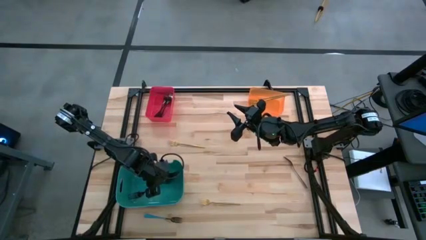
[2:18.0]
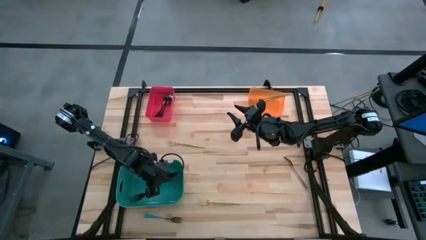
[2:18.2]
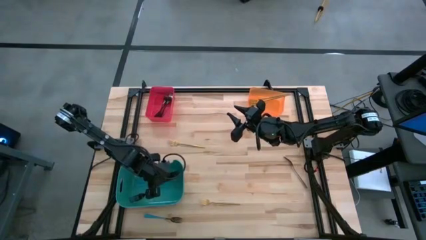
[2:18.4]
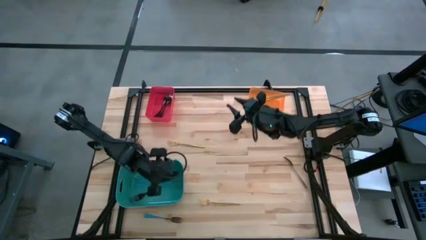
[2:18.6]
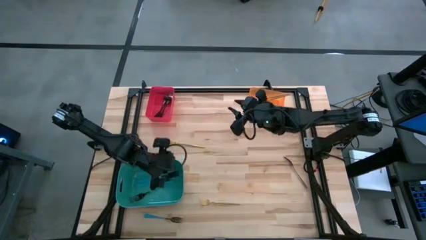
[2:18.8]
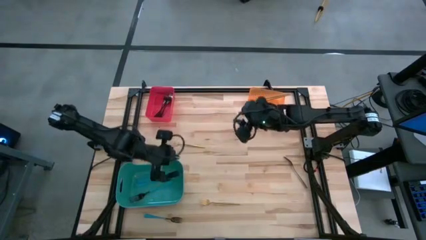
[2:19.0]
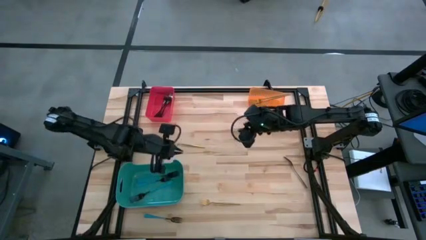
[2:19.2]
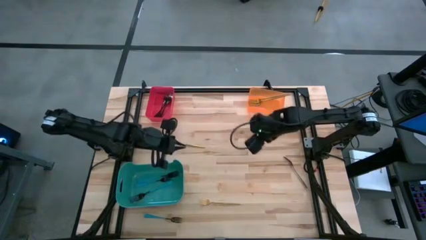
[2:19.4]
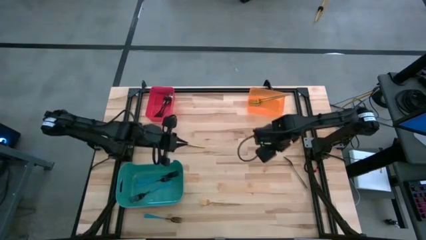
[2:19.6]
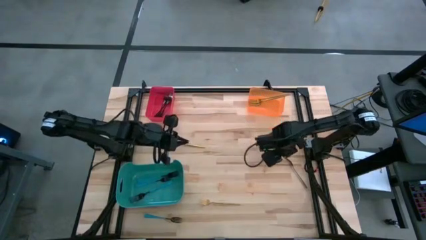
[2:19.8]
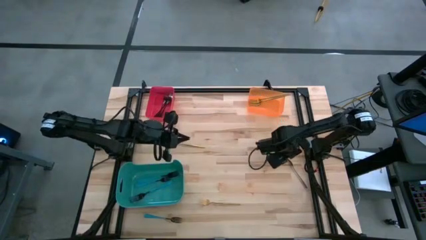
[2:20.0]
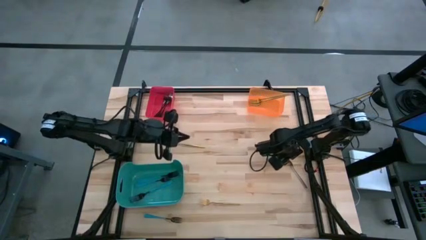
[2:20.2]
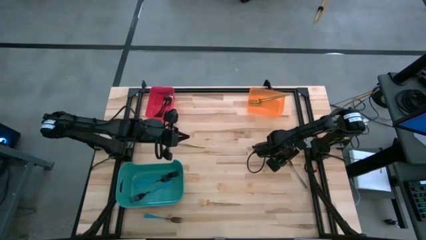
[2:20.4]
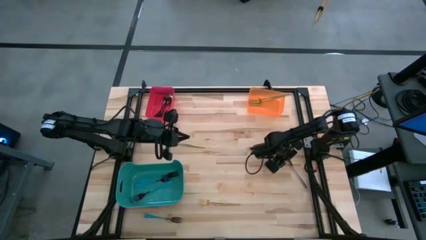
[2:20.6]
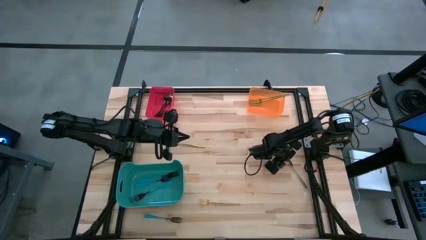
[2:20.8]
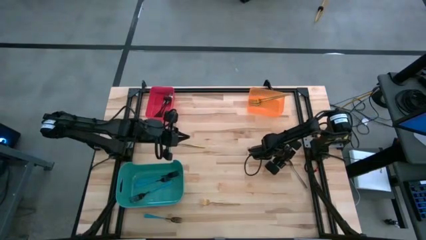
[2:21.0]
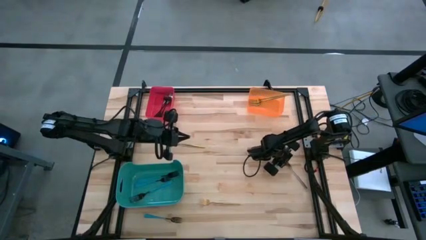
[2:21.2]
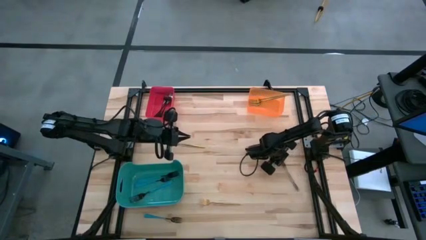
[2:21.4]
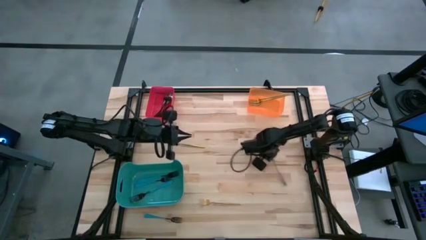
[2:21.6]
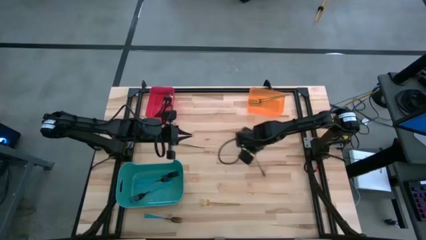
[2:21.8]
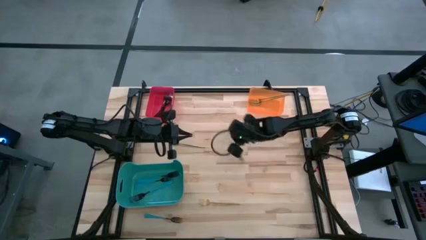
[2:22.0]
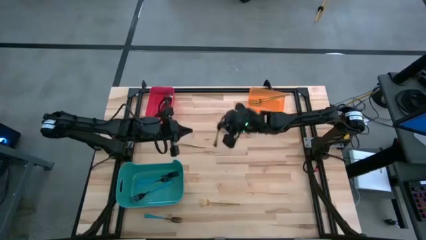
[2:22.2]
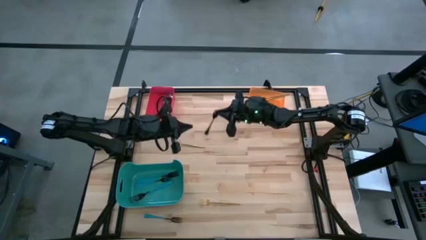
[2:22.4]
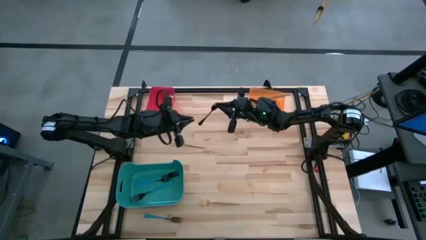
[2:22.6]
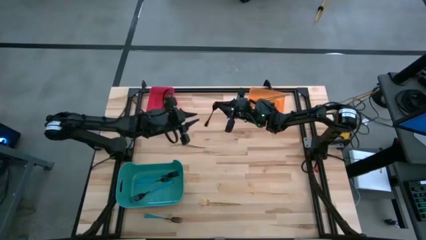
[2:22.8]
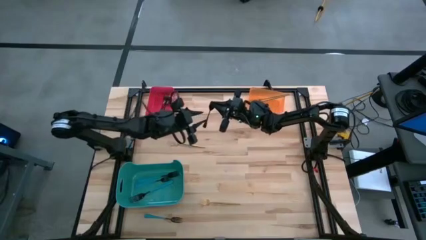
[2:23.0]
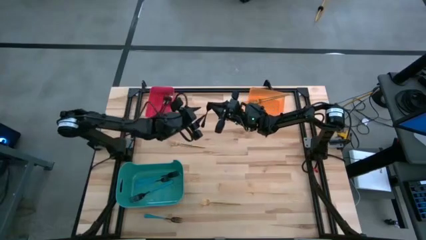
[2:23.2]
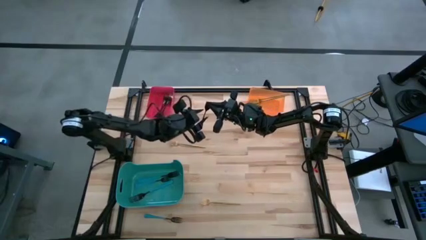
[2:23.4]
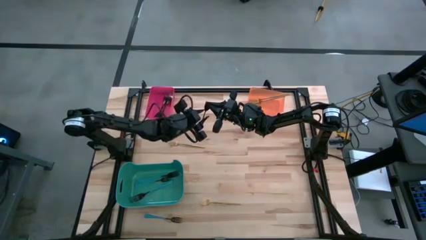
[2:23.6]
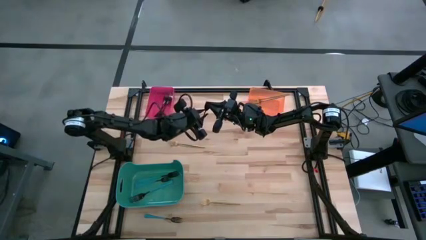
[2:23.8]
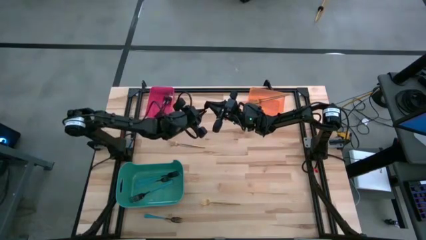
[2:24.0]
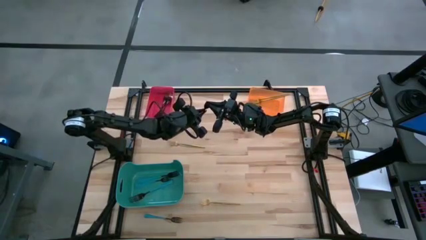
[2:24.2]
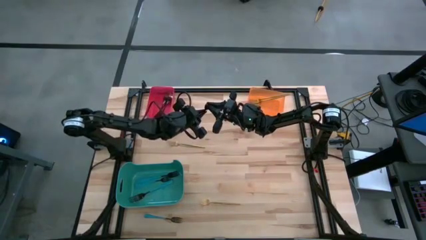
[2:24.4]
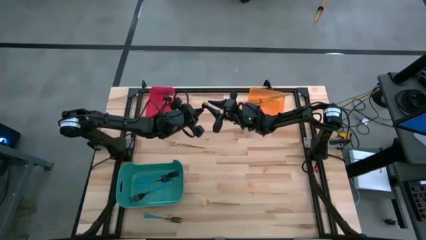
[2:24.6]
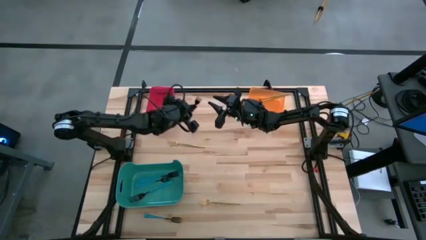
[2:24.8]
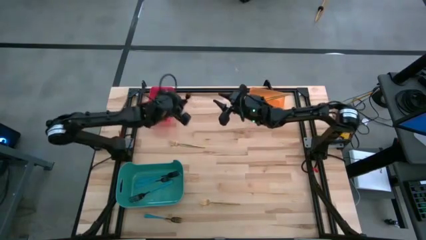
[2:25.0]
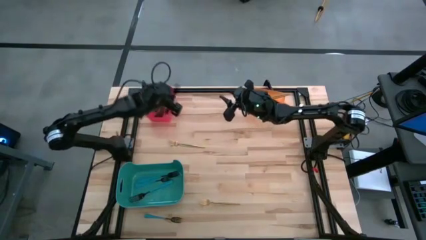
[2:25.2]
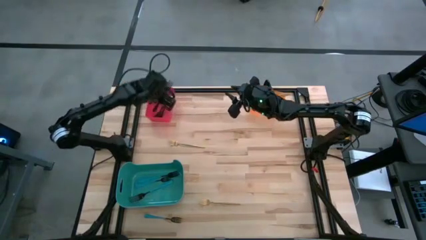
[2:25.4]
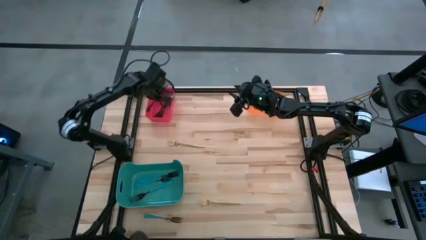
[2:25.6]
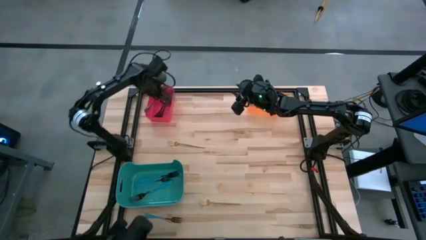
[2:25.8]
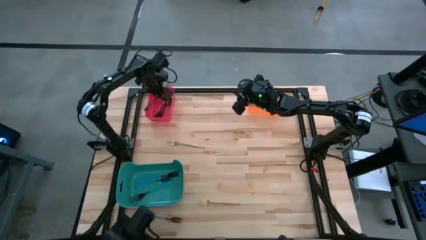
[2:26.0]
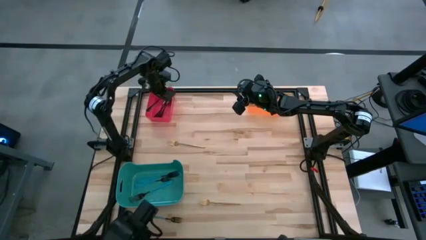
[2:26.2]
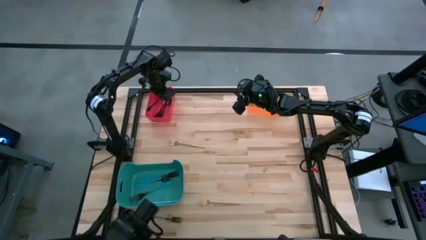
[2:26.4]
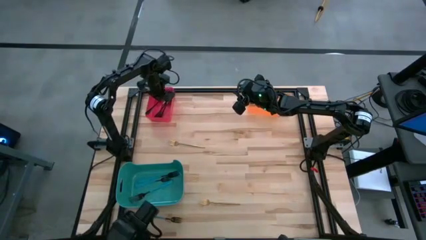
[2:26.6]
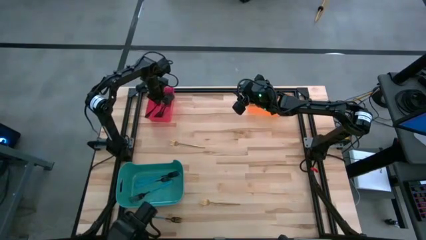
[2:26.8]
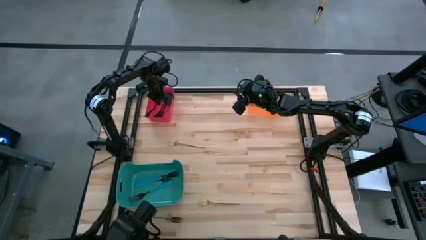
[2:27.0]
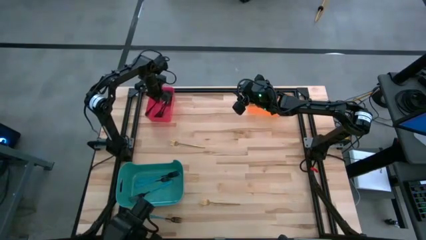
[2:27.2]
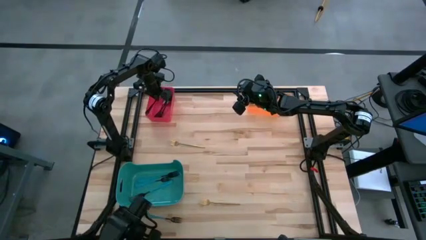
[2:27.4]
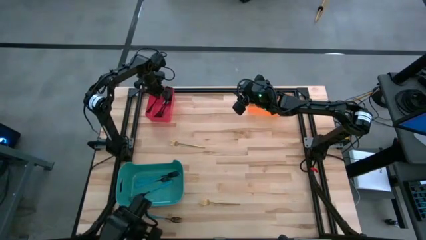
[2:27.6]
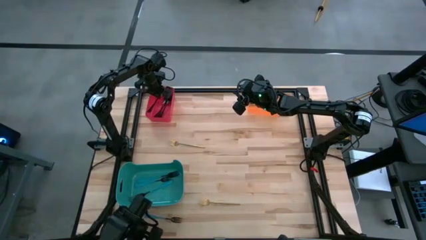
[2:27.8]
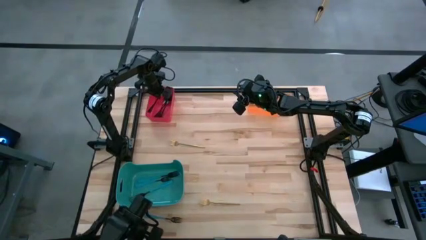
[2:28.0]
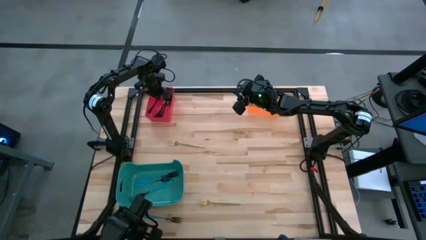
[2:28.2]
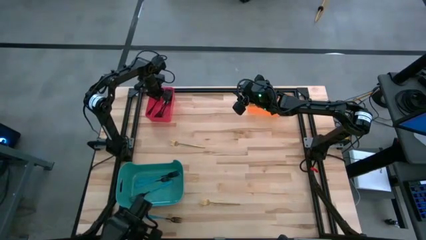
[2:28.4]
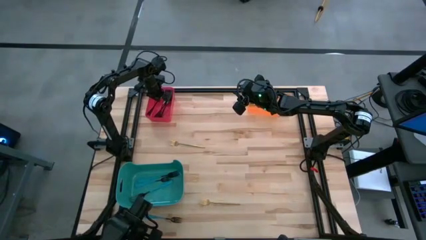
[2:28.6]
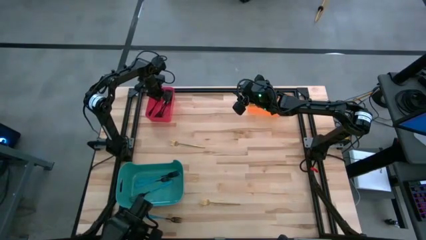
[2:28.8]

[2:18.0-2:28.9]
Task: Sort silverware by color (type)
Put the black fork into the red bin

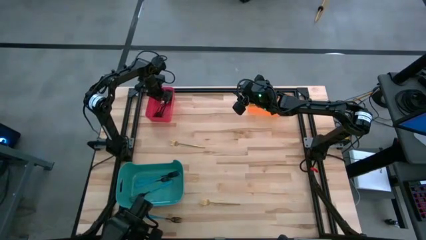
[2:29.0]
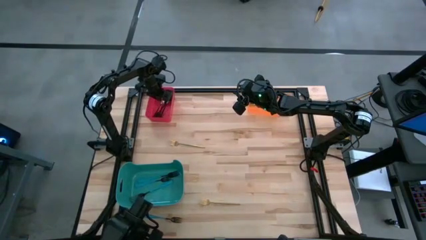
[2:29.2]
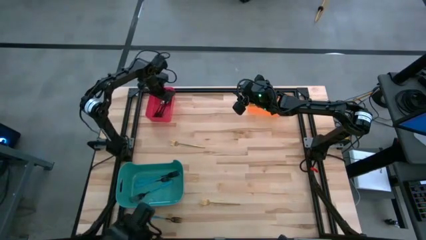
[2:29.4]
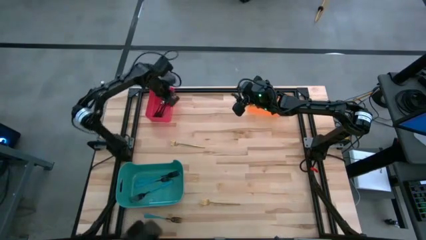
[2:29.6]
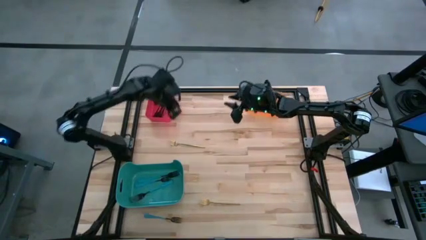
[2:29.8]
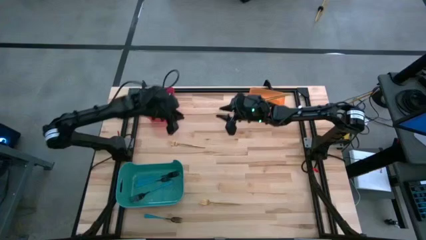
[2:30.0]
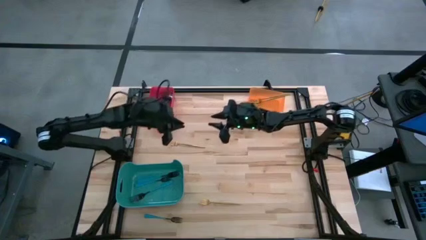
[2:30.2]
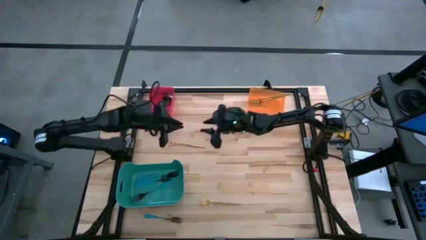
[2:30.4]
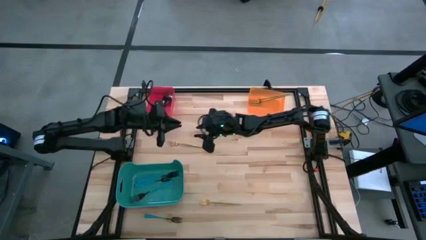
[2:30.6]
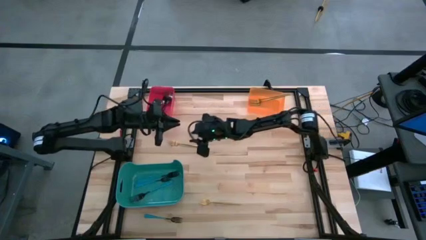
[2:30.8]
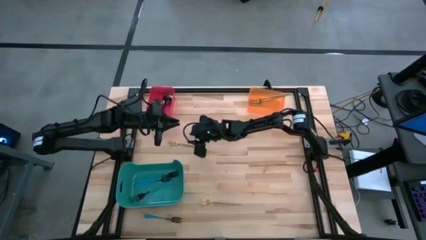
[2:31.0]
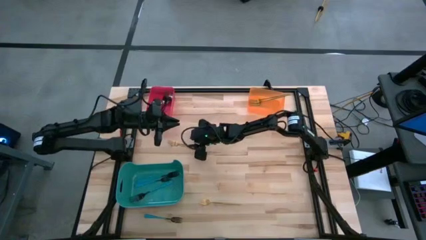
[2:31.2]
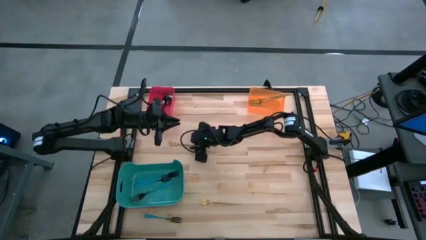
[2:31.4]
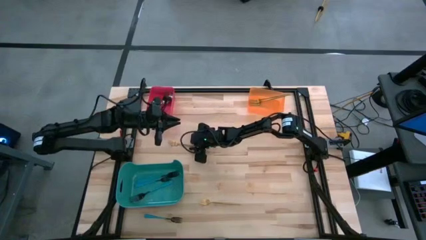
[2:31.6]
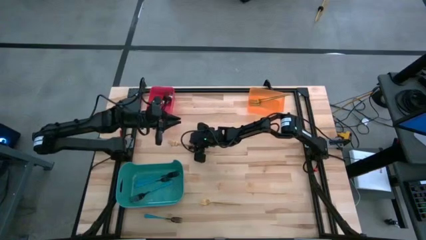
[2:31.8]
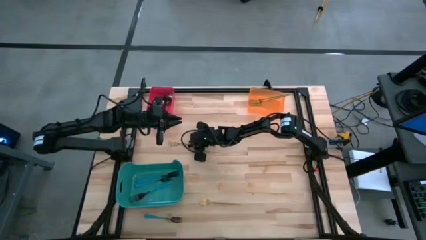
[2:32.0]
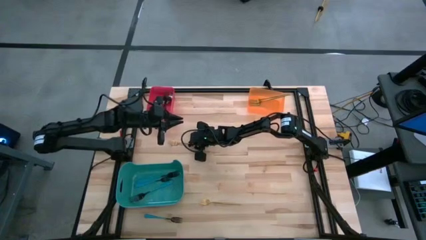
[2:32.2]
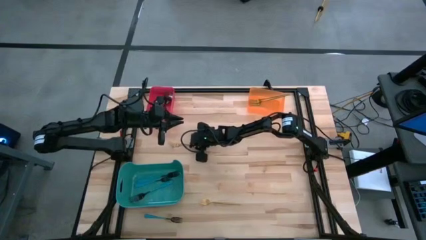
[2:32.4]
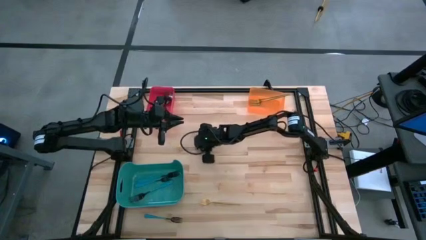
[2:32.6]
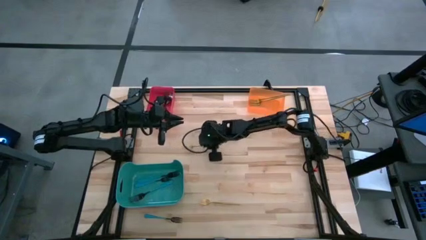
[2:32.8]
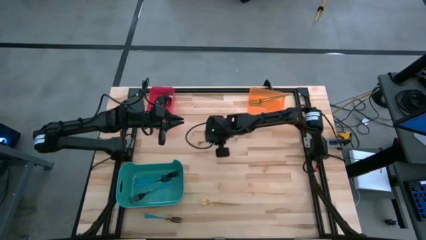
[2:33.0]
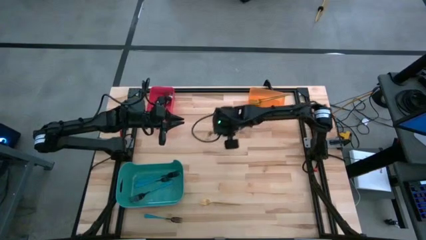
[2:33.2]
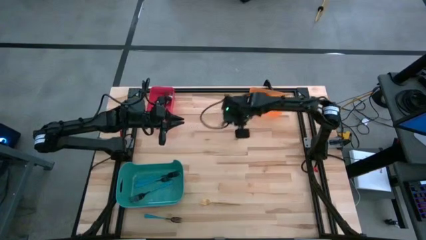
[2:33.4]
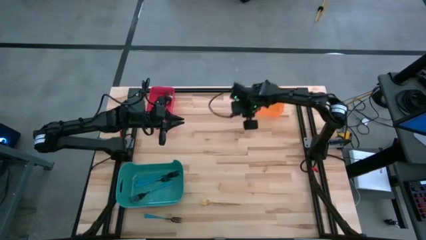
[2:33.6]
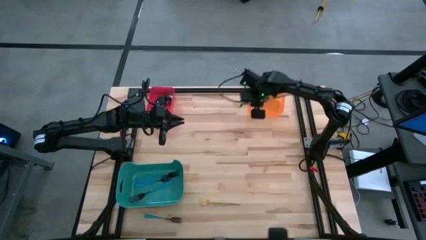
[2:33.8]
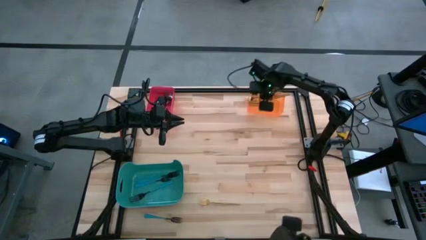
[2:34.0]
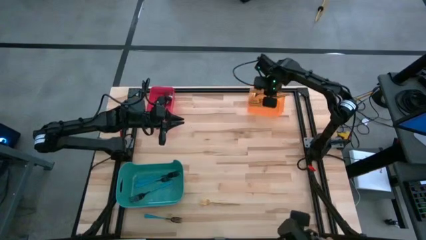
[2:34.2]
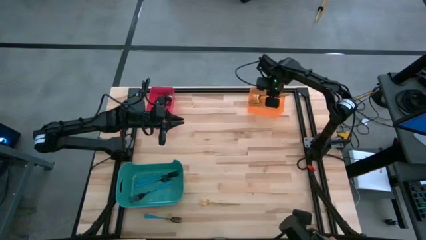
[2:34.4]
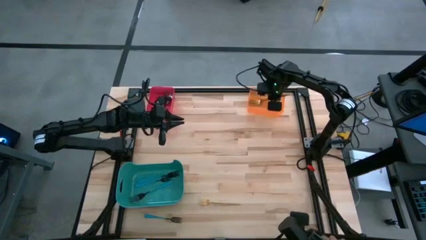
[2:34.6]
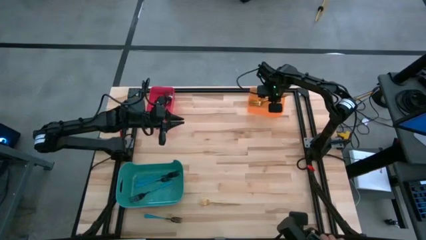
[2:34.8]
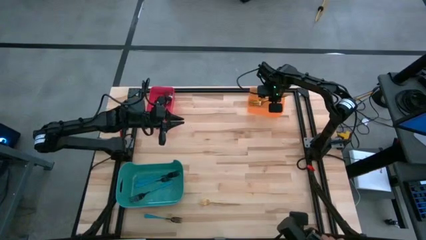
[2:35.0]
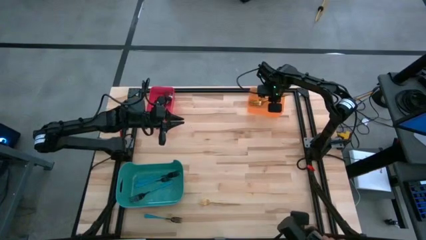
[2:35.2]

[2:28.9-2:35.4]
Put the gold fork into the orange bin
